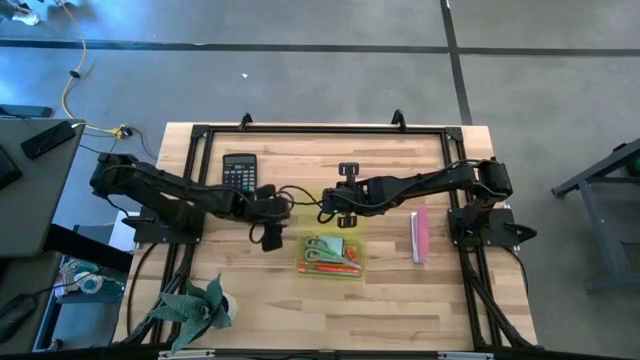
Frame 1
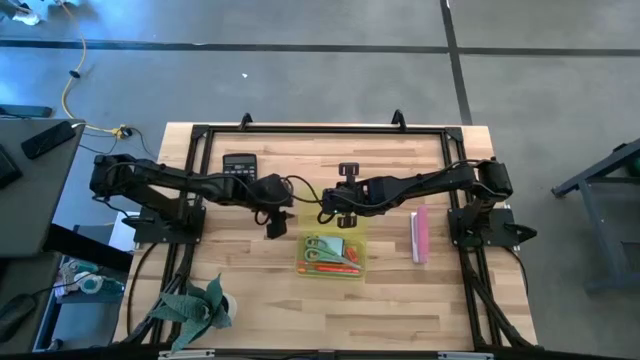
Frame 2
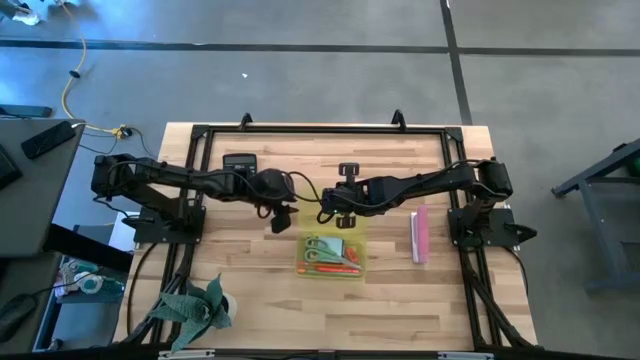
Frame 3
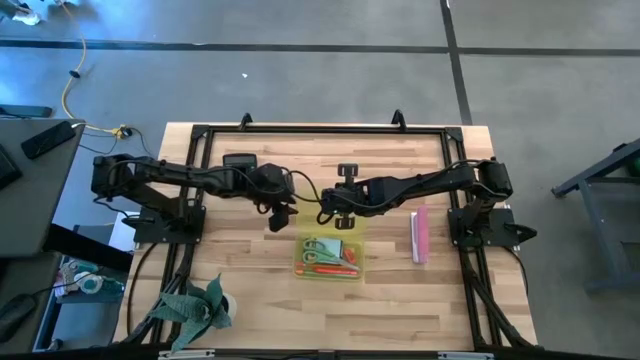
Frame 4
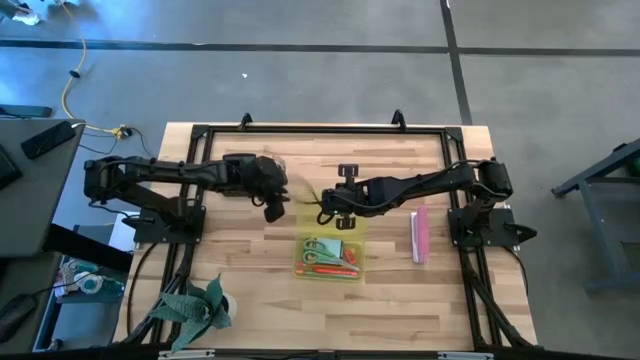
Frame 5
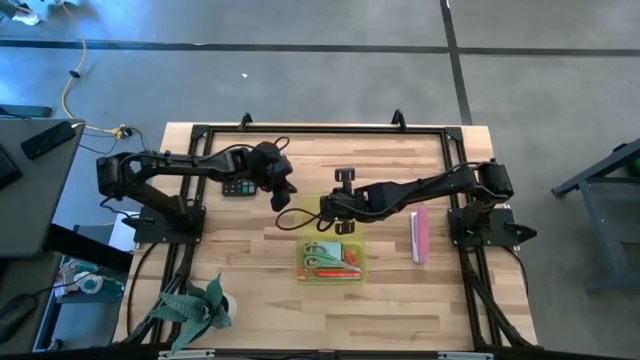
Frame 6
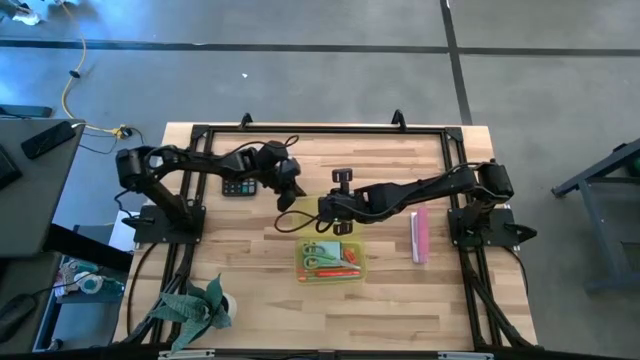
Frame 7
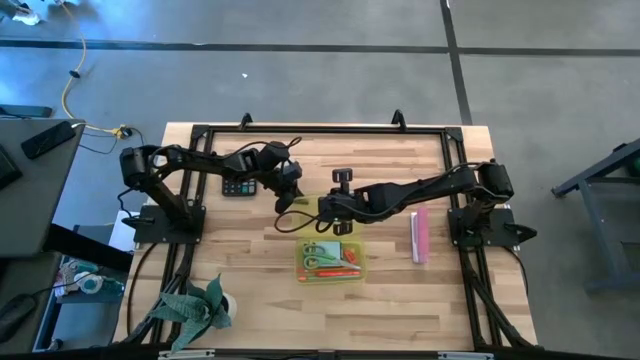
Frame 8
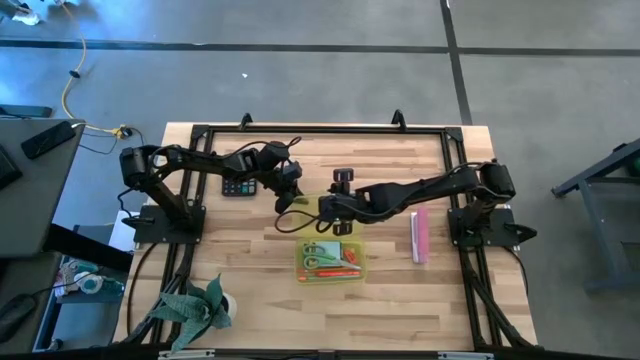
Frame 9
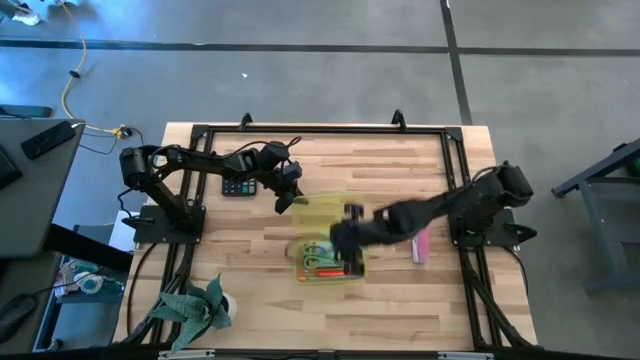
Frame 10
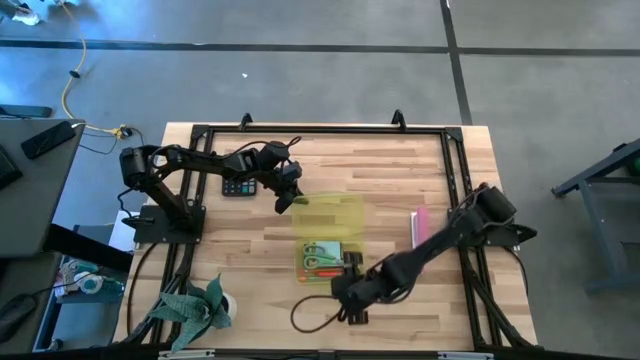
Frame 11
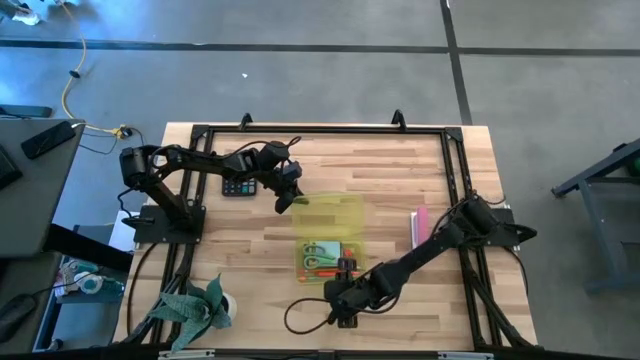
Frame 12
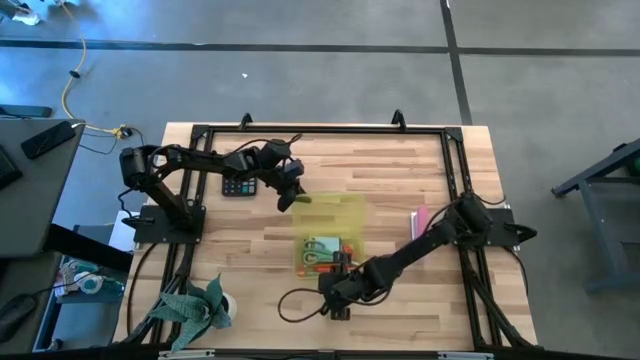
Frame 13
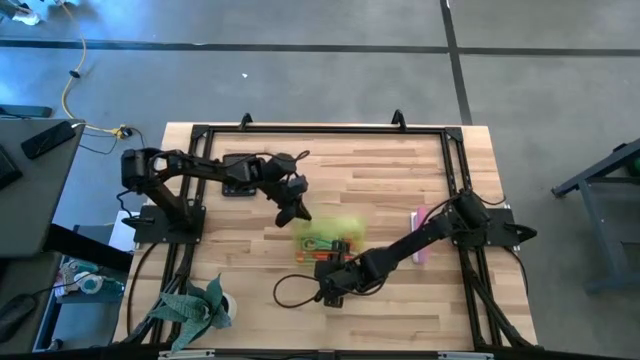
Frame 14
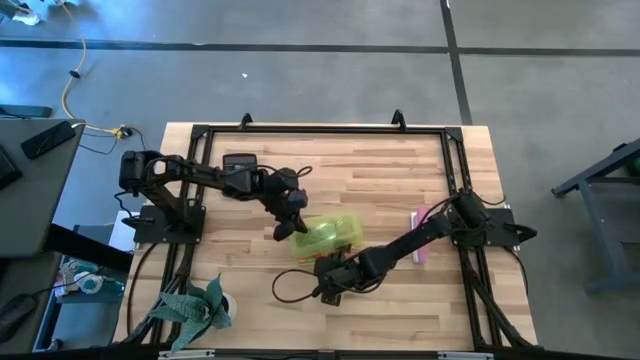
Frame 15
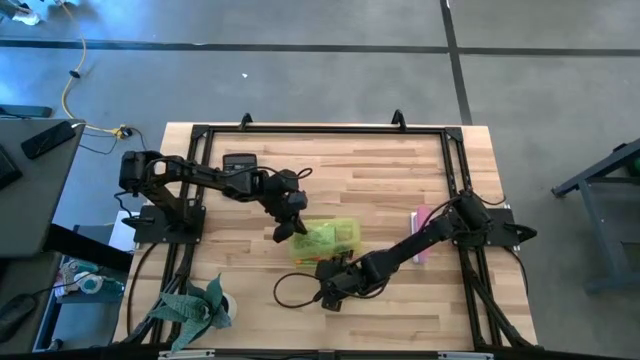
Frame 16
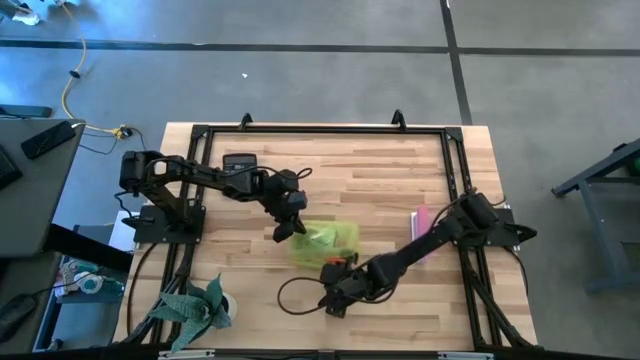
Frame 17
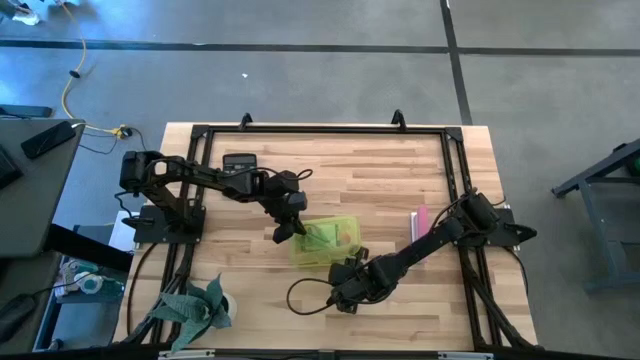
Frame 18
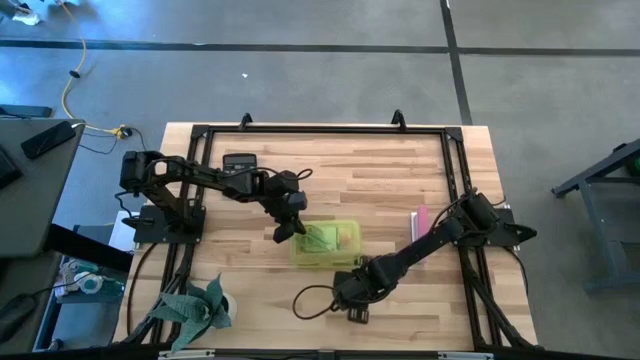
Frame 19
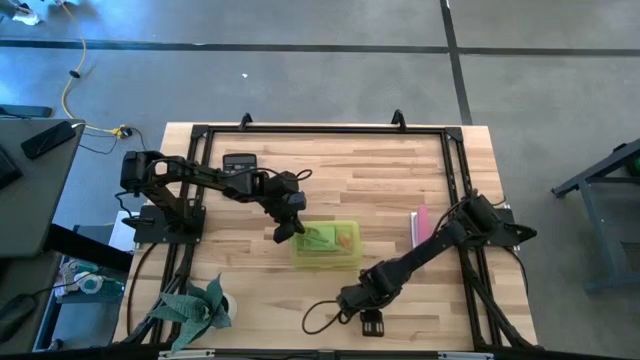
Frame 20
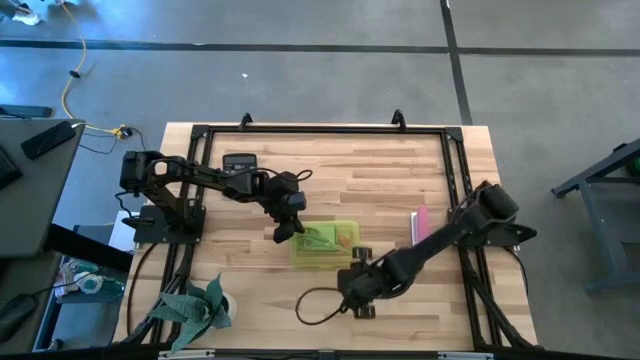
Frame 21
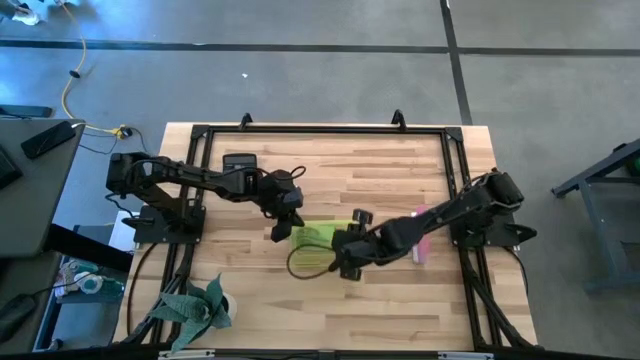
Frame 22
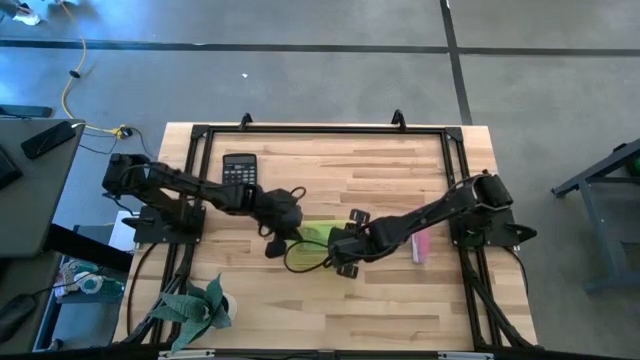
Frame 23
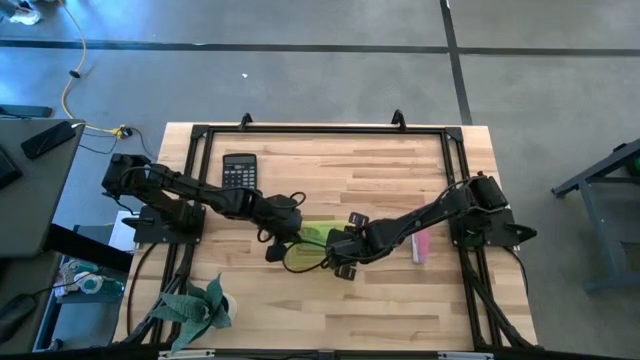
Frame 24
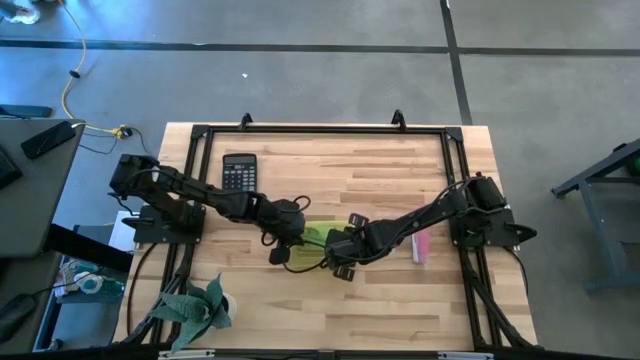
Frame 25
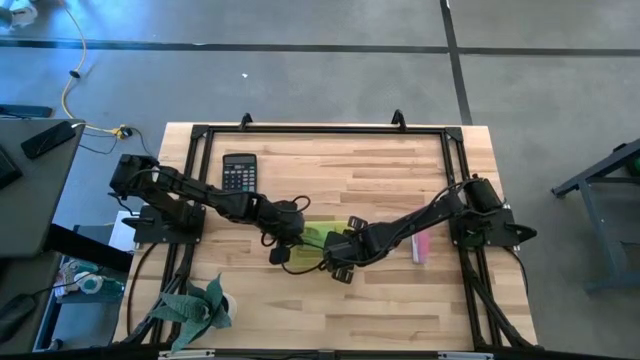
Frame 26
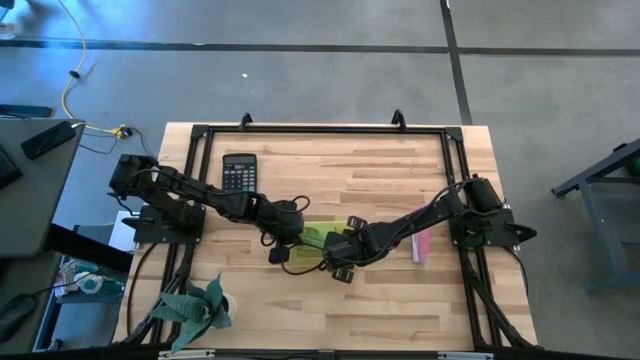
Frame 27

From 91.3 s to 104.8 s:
Task: Pack school essentials
Close the yellow supply box

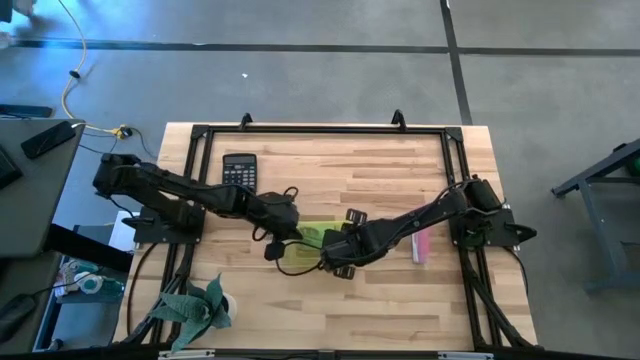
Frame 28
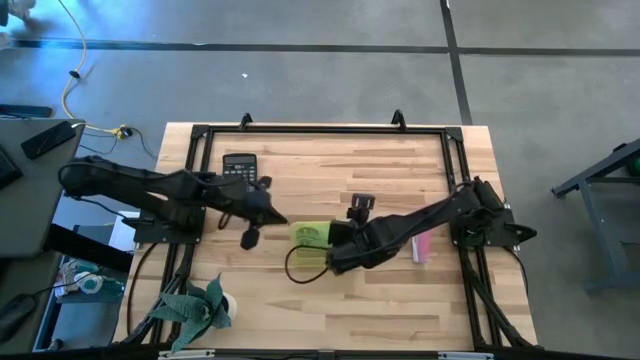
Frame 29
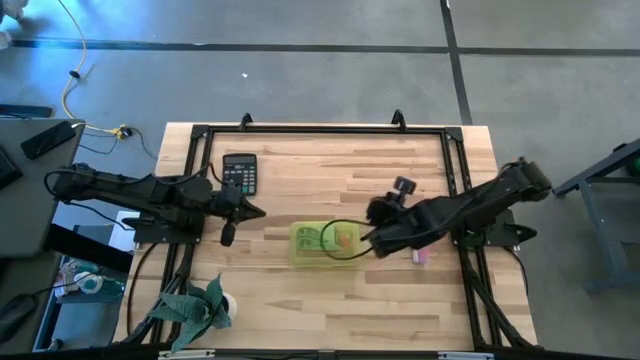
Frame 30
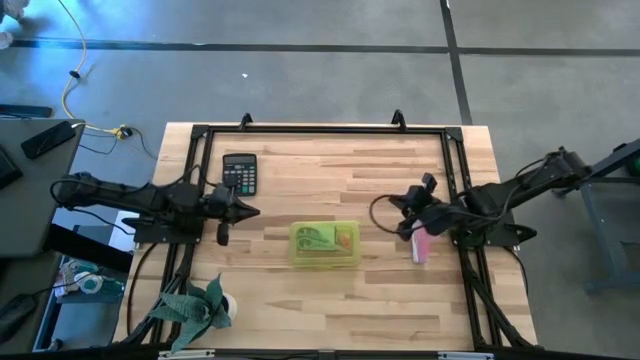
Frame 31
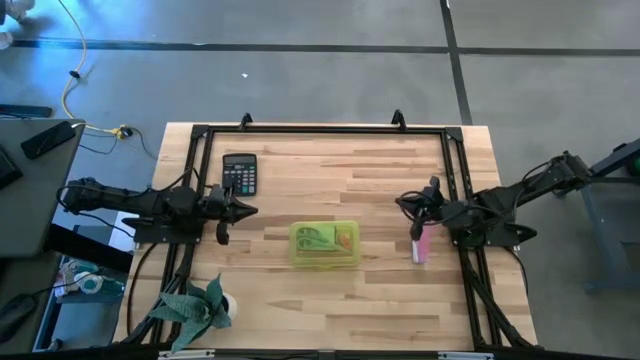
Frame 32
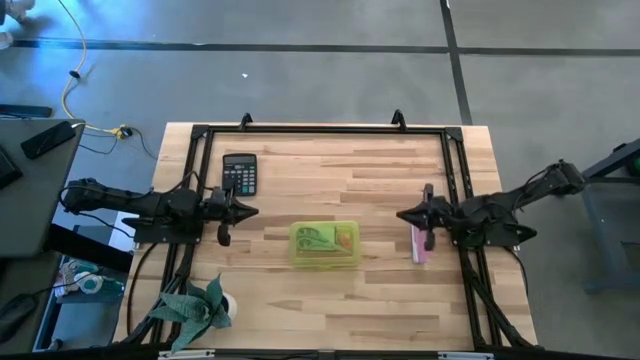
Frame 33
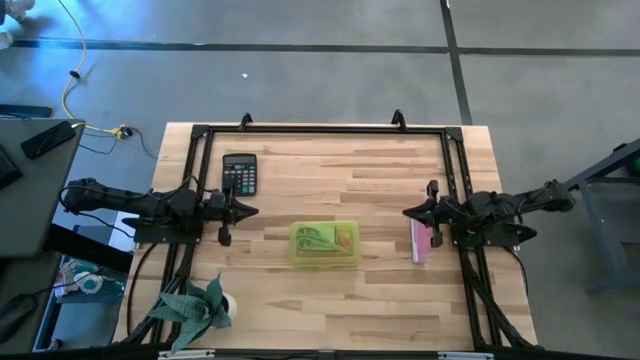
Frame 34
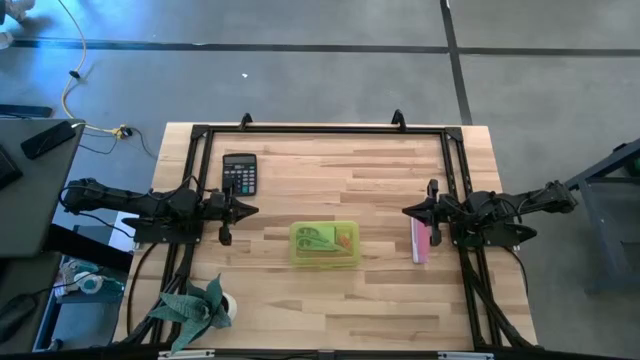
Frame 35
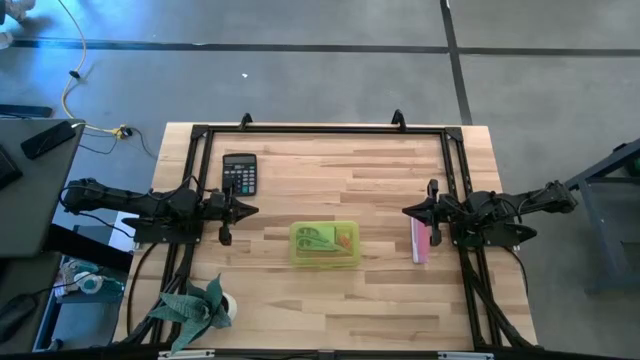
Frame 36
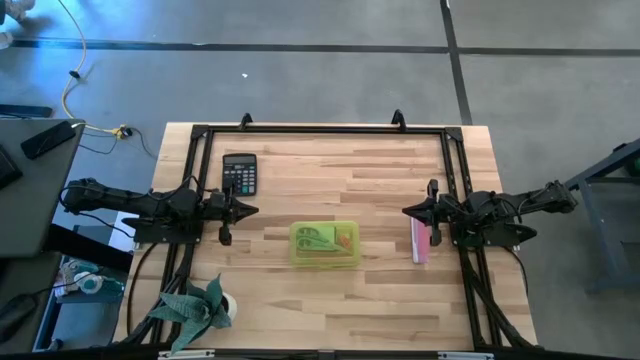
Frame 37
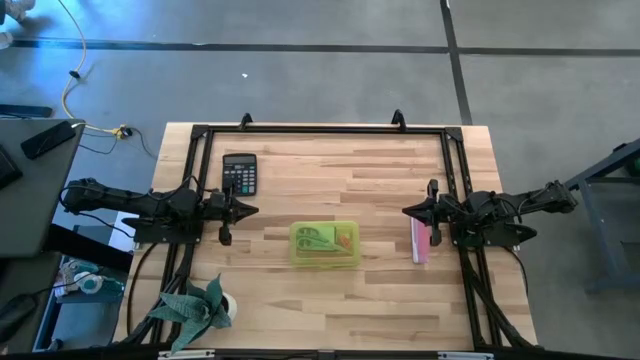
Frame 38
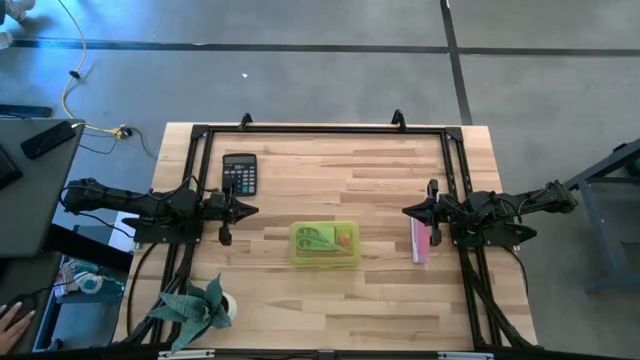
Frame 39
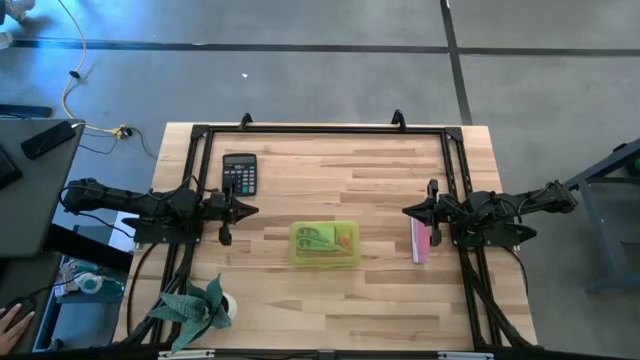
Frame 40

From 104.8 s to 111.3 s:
Return to Home Position
